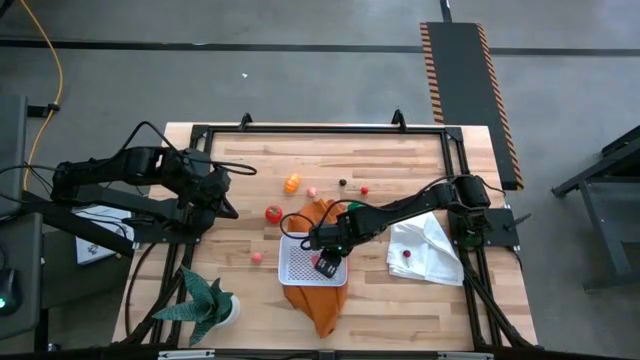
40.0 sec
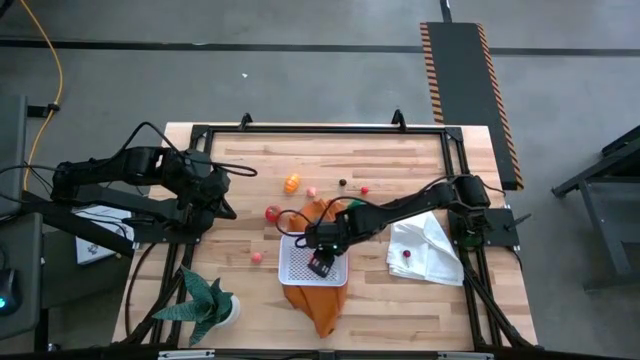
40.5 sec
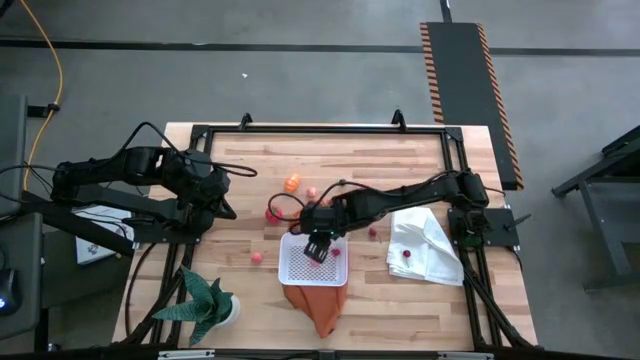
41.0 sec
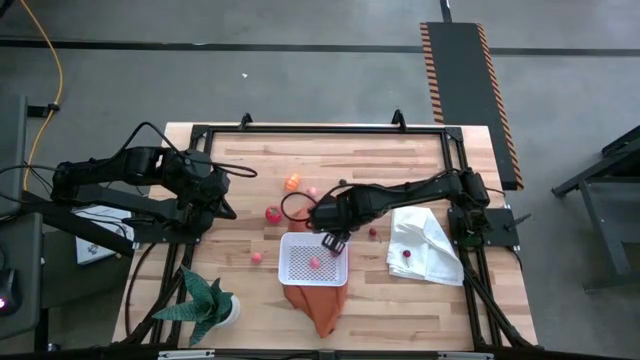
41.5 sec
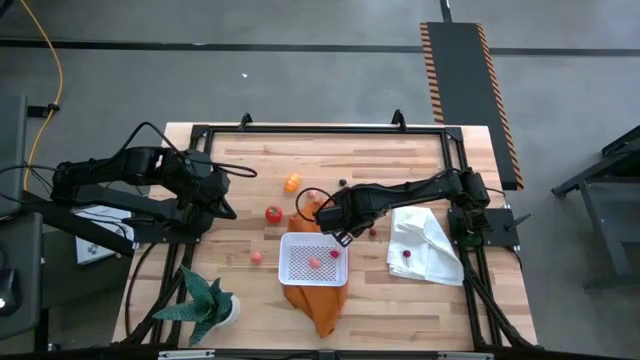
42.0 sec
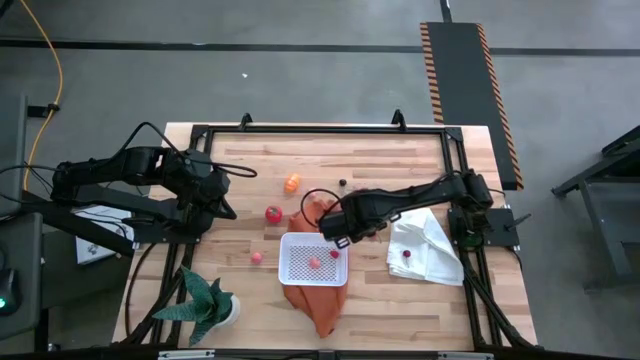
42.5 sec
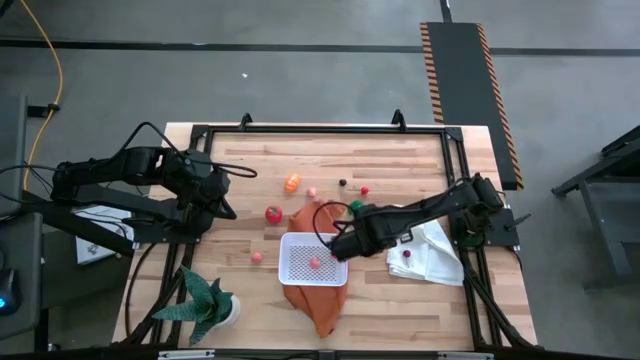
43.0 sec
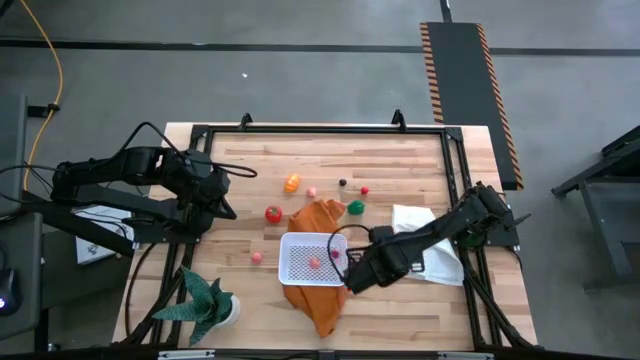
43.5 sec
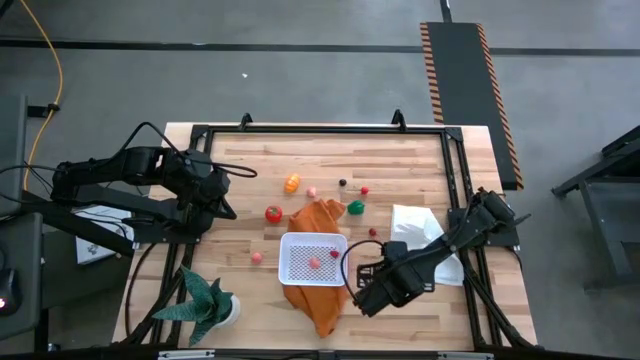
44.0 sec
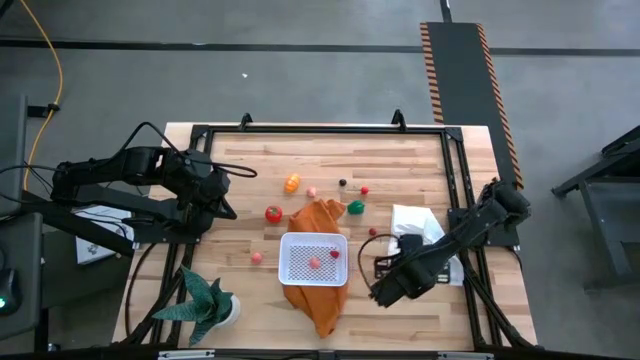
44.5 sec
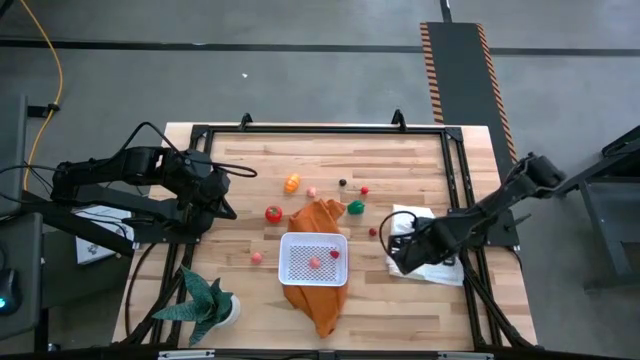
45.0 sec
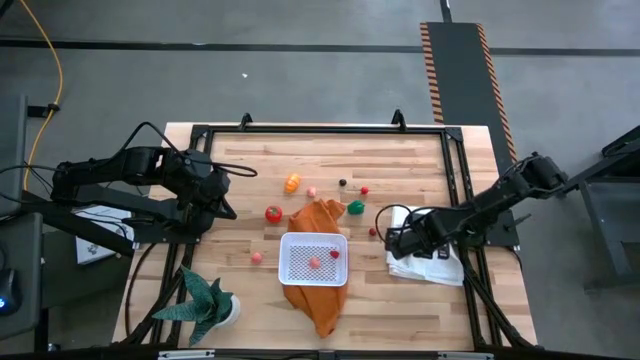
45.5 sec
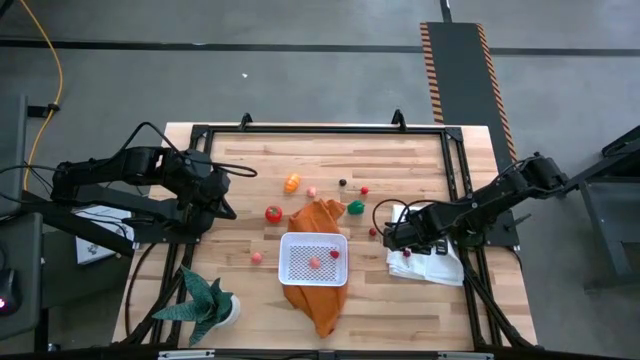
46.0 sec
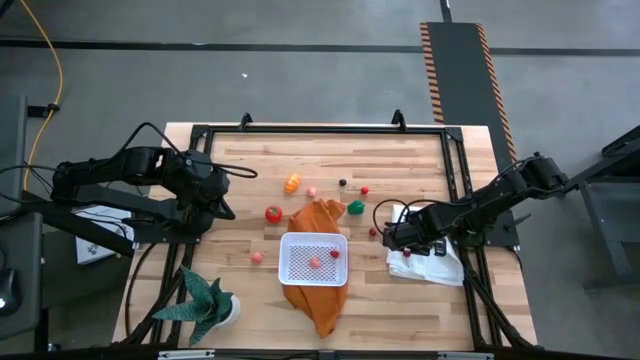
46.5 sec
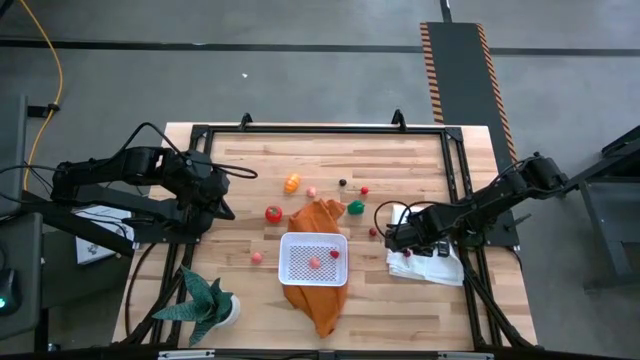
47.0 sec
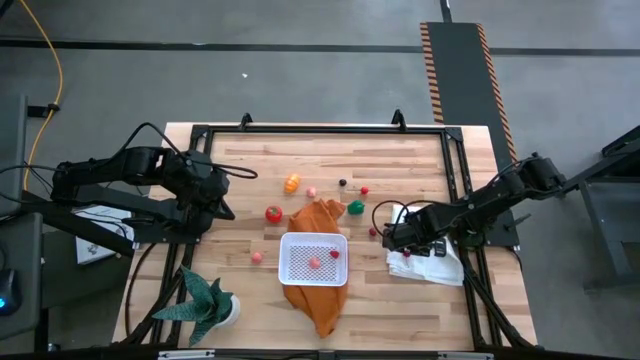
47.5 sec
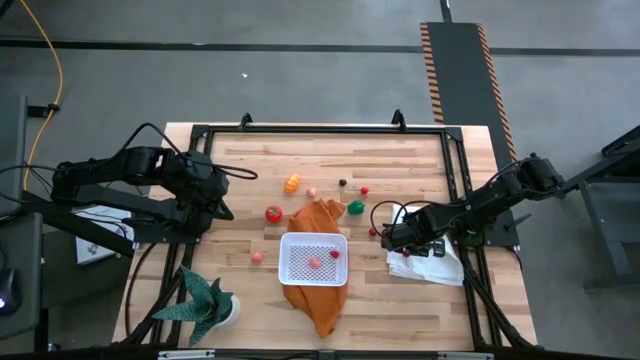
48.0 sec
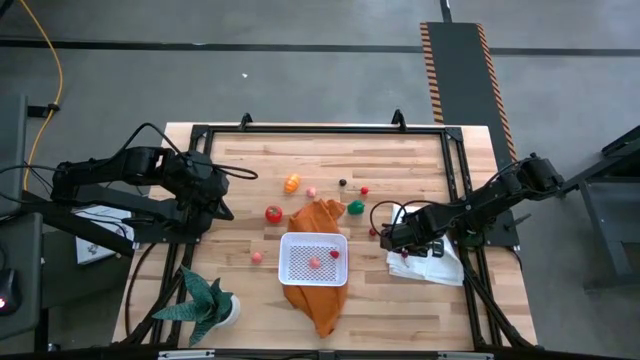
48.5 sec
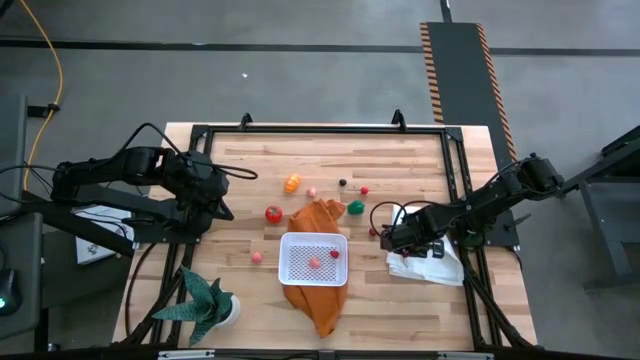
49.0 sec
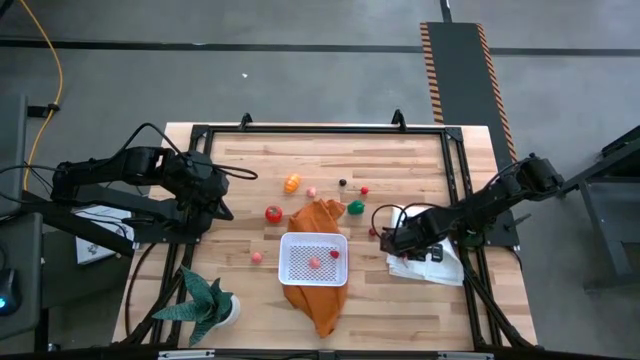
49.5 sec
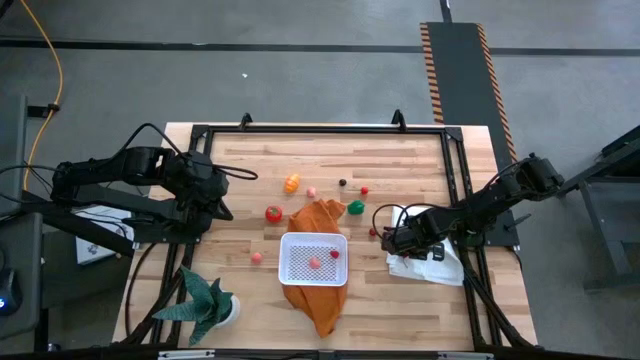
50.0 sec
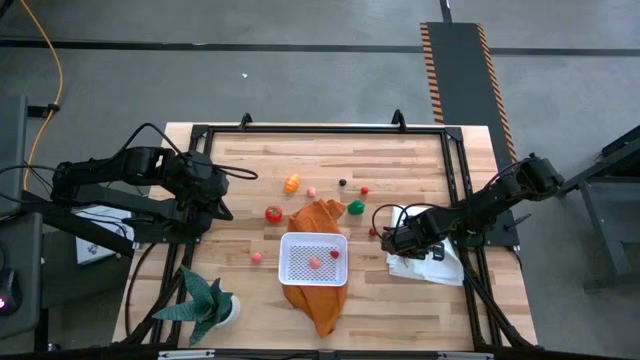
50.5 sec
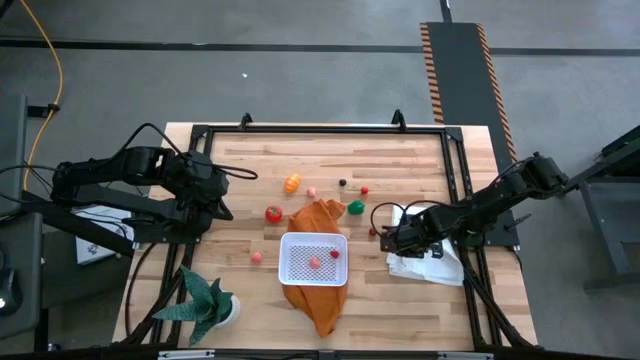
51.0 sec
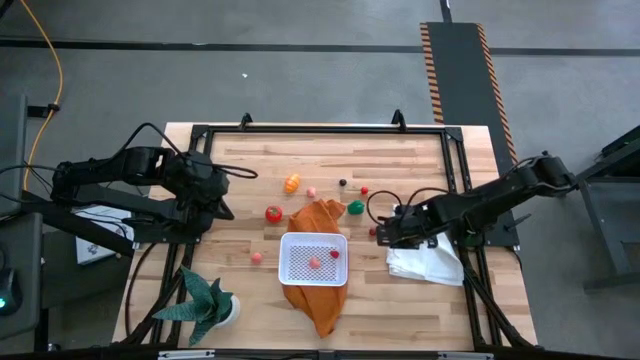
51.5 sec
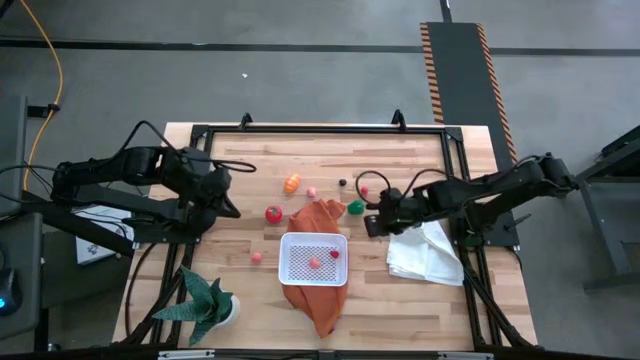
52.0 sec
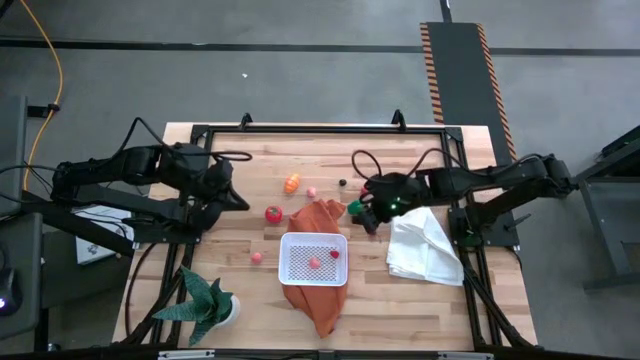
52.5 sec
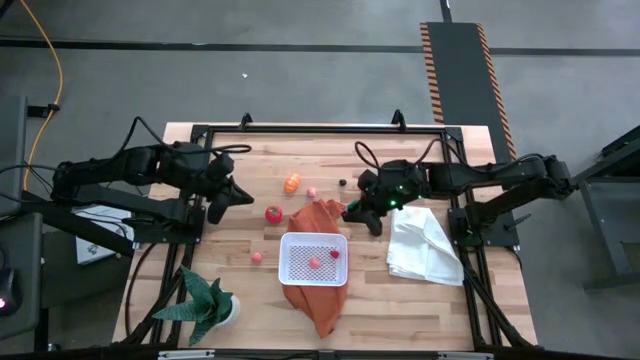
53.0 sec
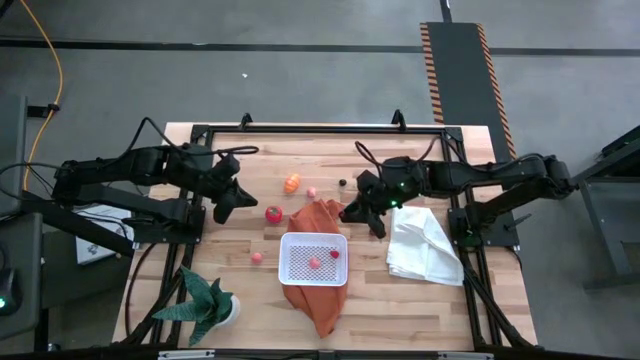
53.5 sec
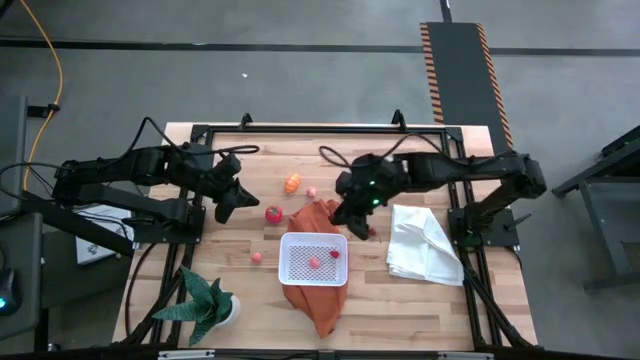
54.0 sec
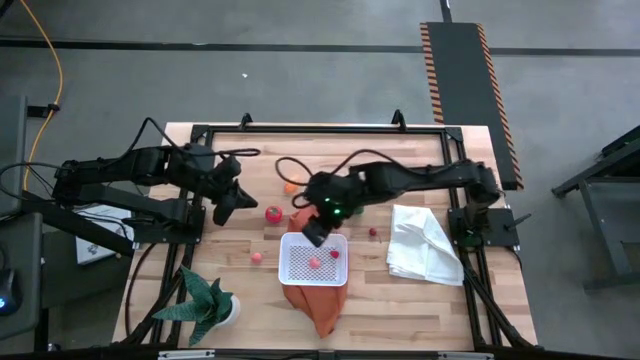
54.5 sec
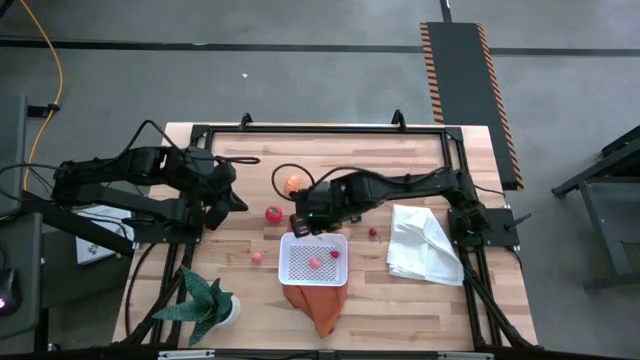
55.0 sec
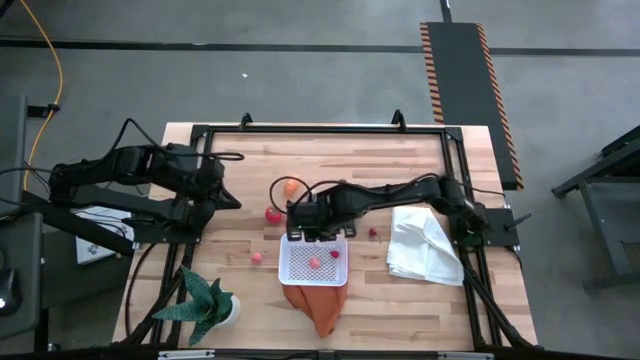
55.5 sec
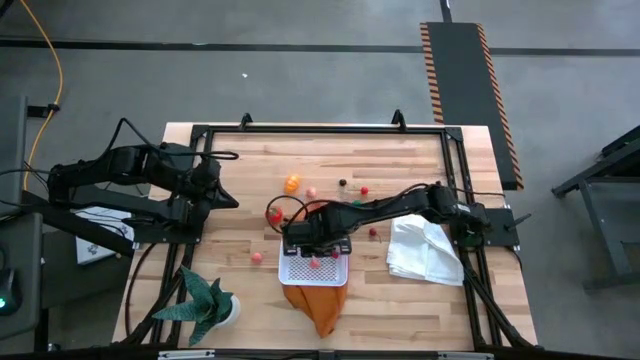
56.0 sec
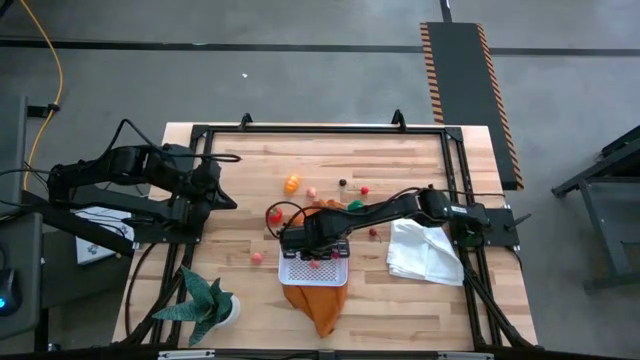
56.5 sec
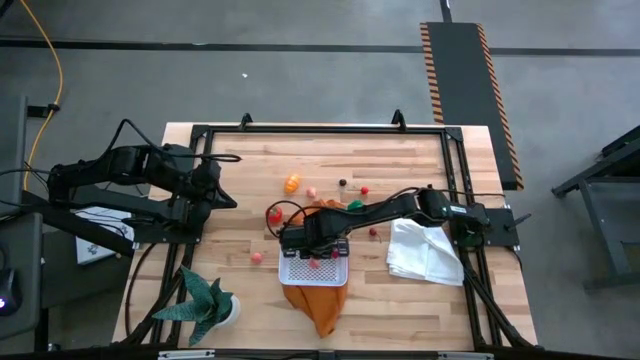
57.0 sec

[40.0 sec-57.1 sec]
Task: Pick and placing Produce into tupperware
Put the bottom red cherry into the white basket
